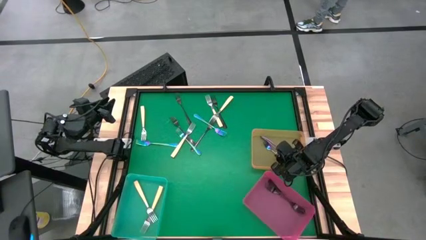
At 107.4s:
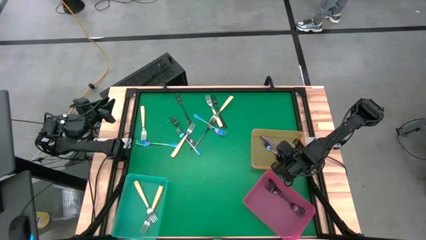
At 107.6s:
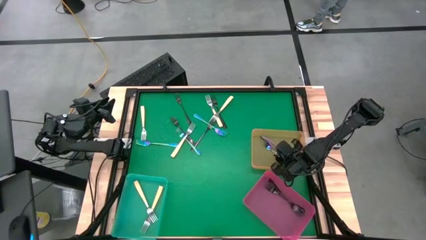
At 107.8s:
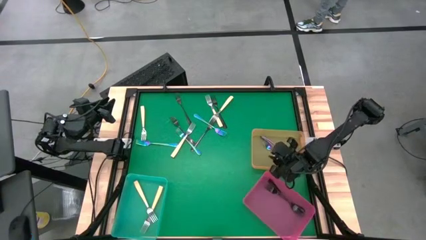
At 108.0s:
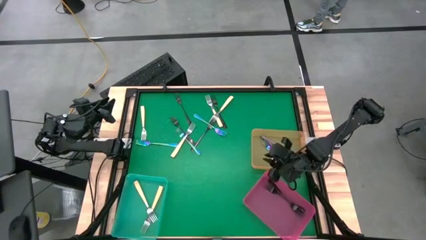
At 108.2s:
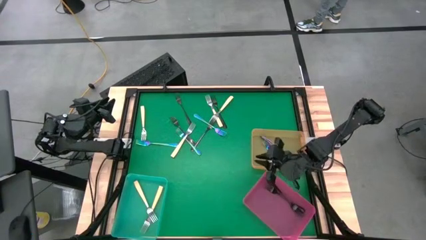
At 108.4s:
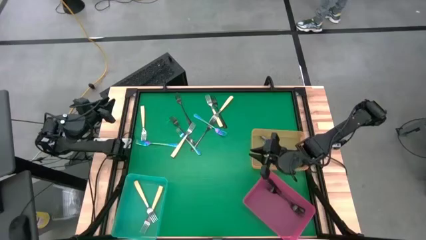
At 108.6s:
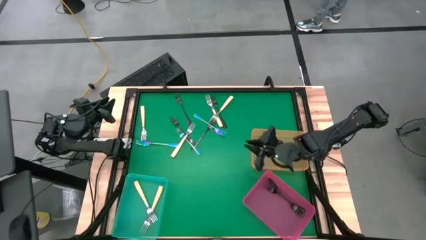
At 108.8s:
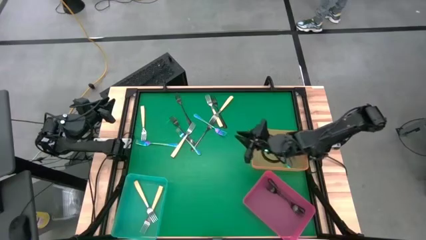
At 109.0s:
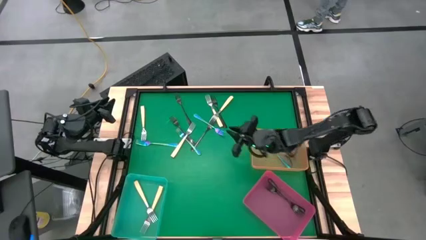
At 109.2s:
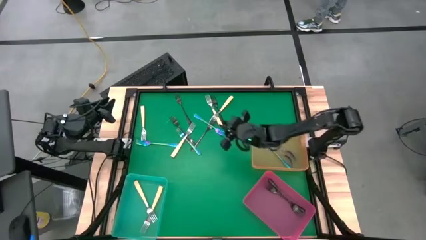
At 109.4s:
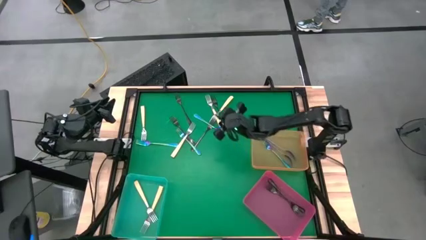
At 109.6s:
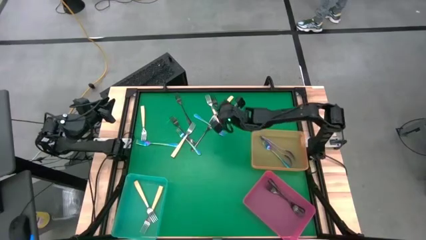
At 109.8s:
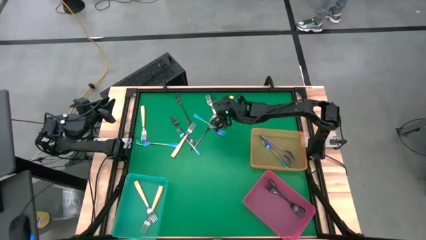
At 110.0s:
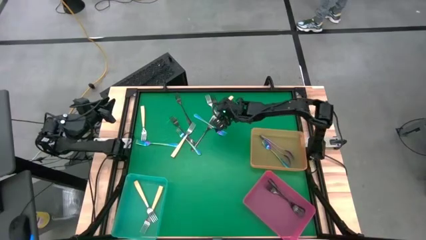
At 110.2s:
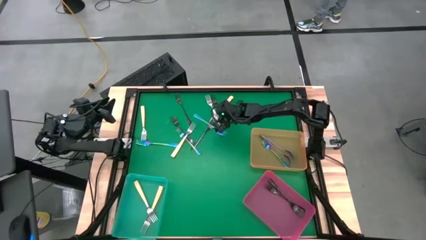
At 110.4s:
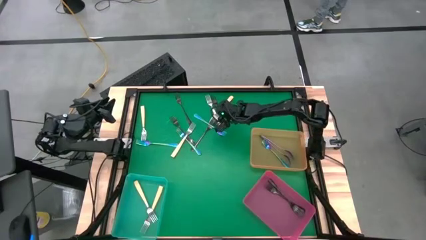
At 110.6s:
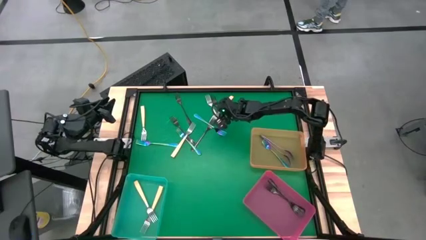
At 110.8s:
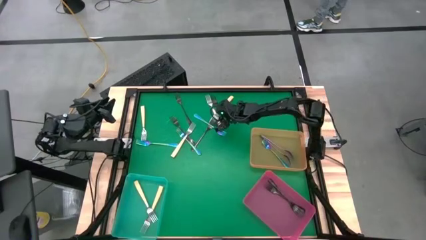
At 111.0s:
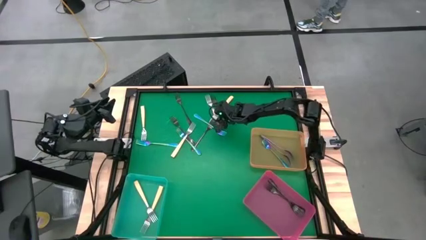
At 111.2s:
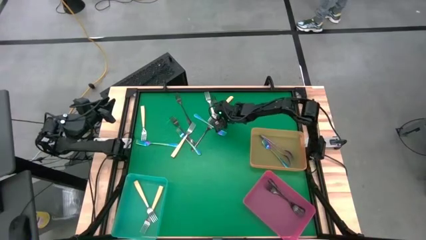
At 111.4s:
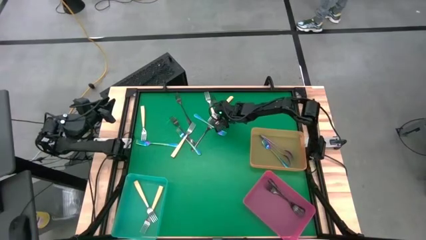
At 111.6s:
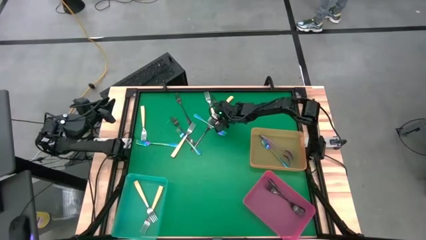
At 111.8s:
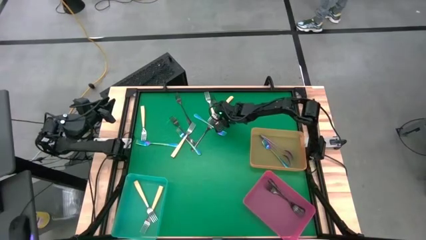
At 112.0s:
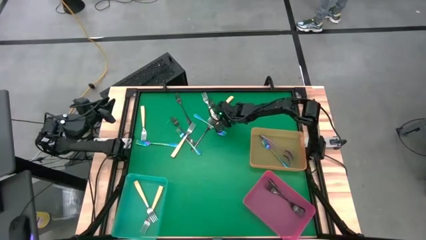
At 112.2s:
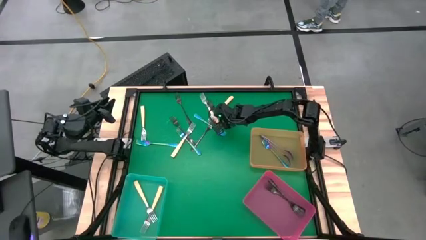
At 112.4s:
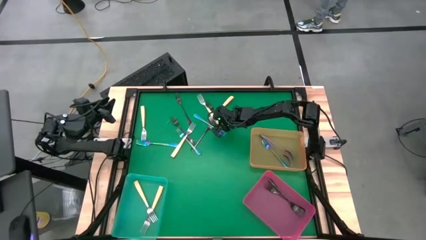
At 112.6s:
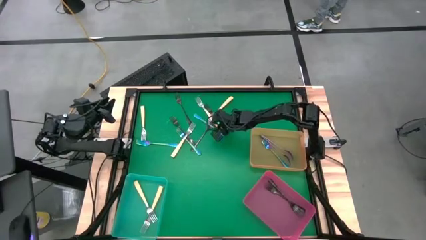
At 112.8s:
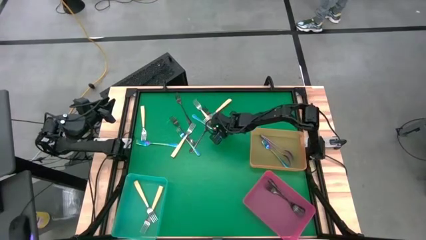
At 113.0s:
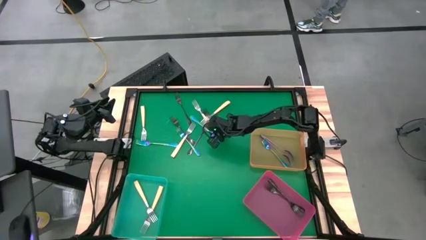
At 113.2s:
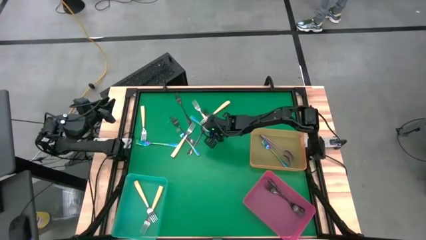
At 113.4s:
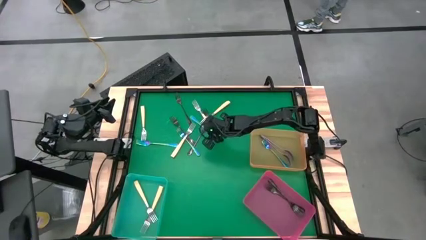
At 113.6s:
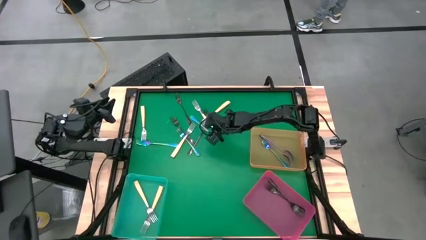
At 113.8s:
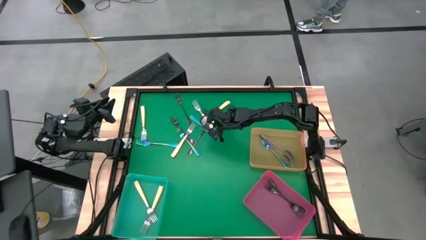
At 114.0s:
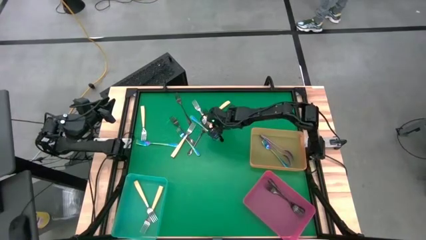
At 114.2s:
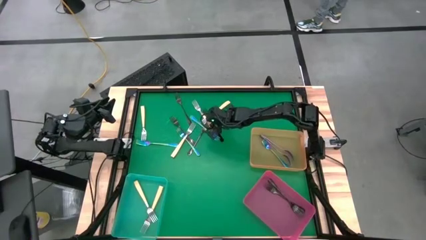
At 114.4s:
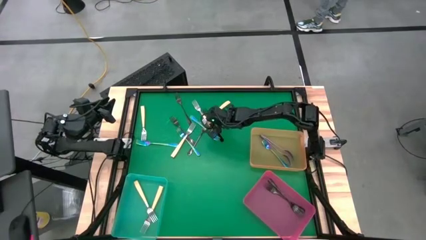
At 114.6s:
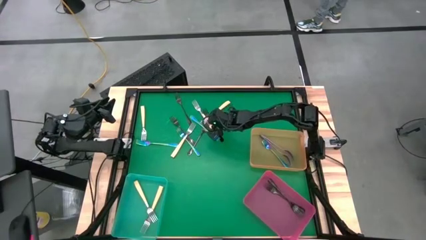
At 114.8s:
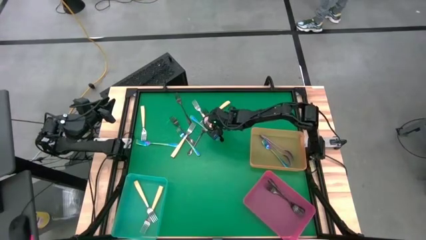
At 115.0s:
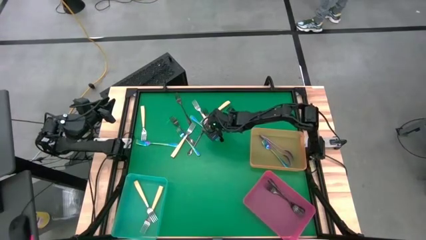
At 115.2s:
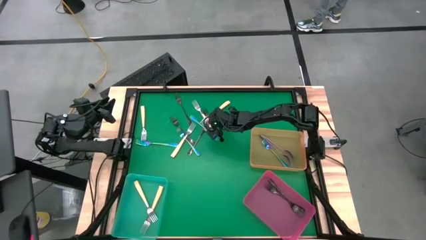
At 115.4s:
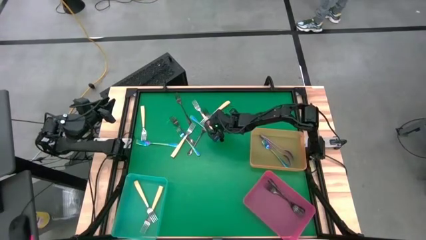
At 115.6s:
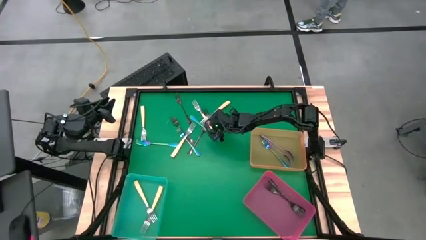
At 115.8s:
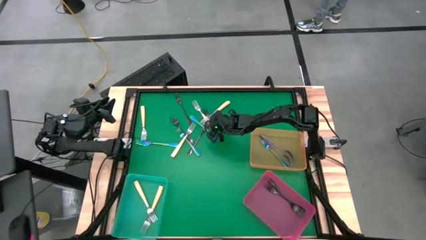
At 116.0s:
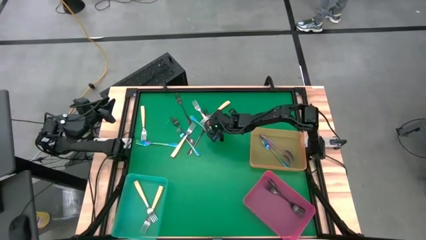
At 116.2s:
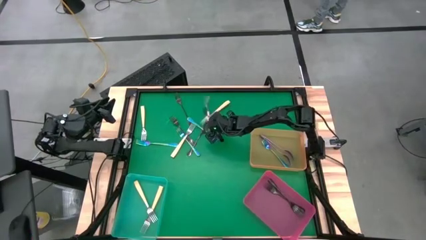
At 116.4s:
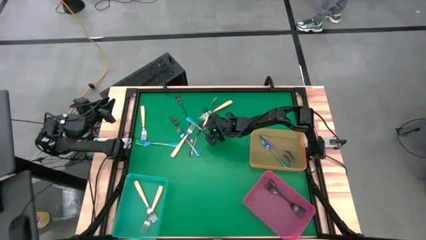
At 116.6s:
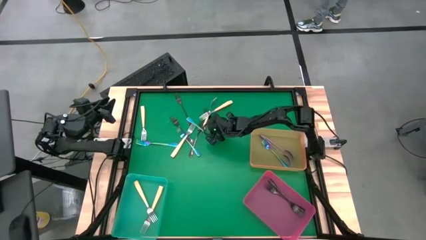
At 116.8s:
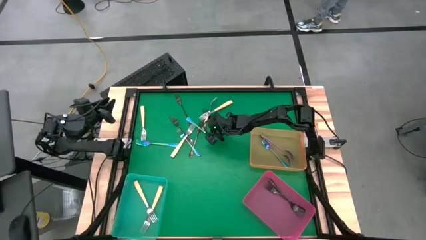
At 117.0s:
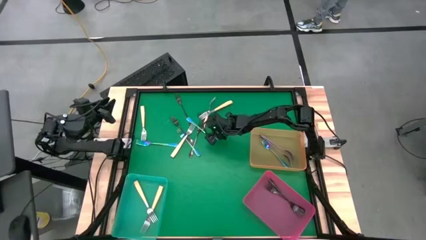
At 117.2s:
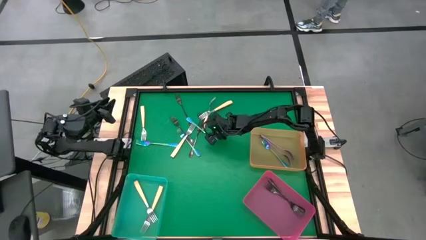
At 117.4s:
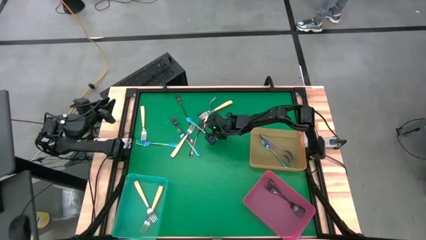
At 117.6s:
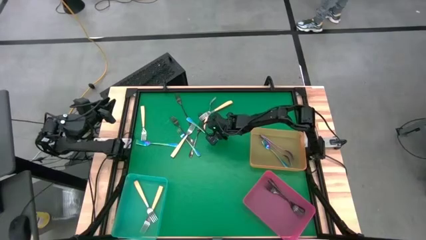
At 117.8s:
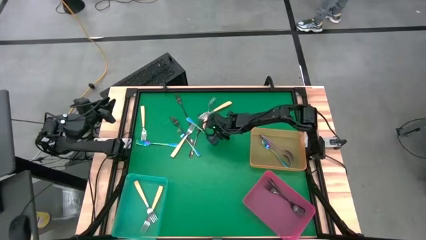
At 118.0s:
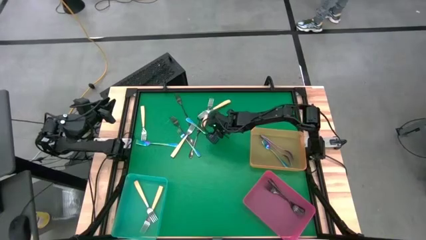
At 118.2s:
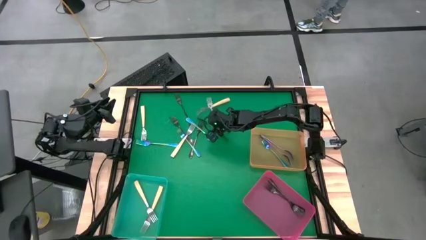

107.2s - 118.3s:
Task: Sort silverware by color (type)
Put the black fork into the pink bin

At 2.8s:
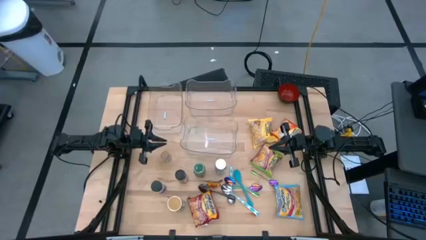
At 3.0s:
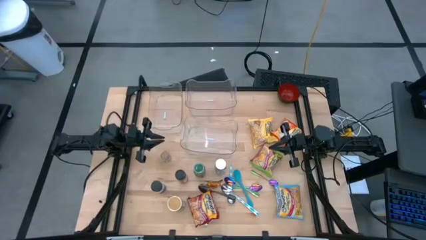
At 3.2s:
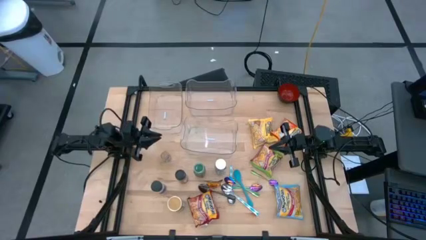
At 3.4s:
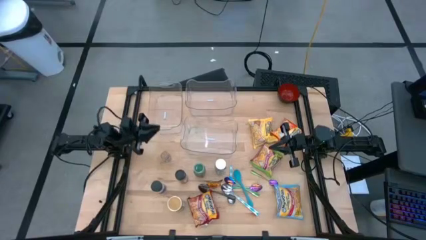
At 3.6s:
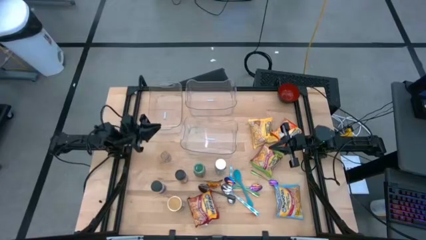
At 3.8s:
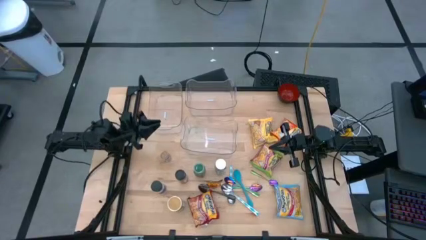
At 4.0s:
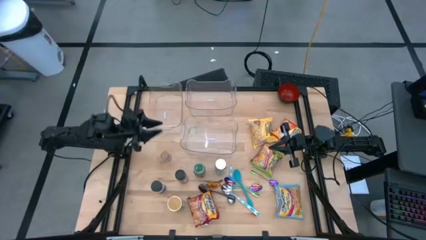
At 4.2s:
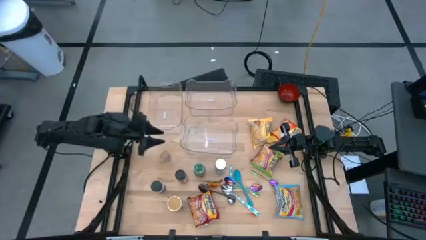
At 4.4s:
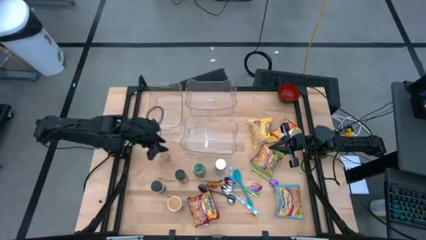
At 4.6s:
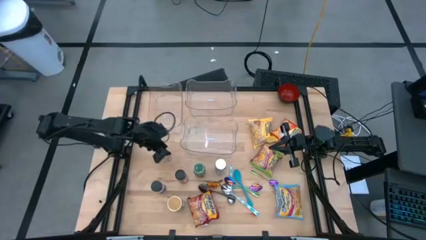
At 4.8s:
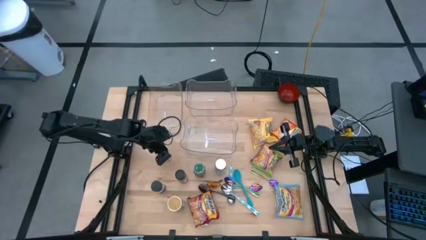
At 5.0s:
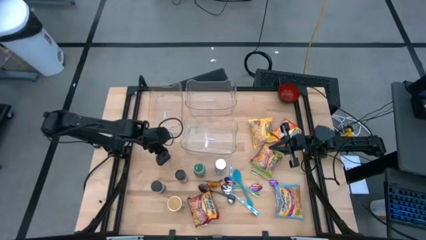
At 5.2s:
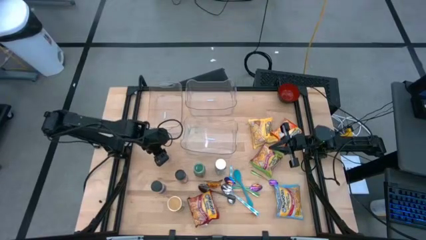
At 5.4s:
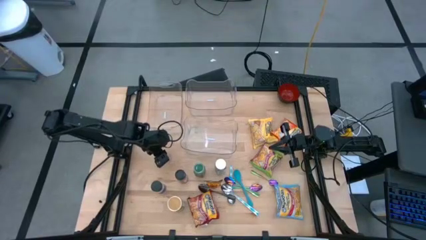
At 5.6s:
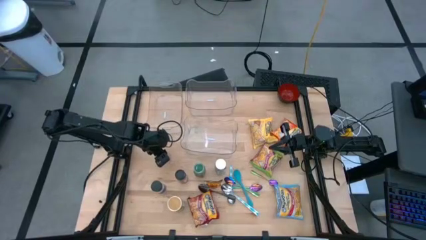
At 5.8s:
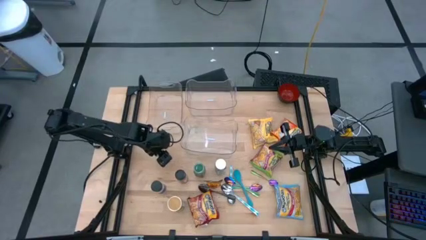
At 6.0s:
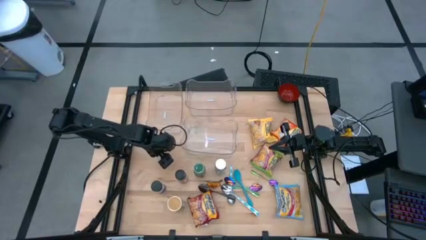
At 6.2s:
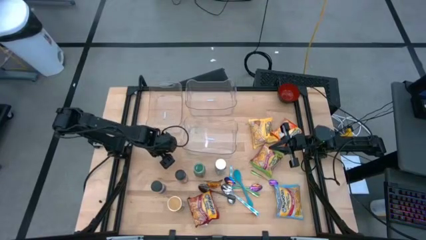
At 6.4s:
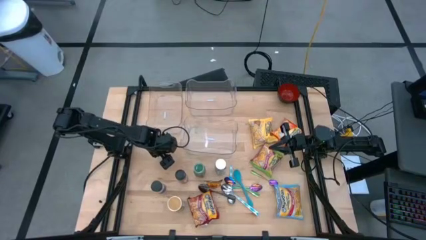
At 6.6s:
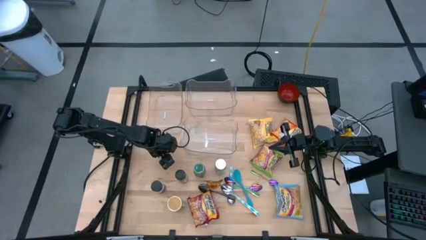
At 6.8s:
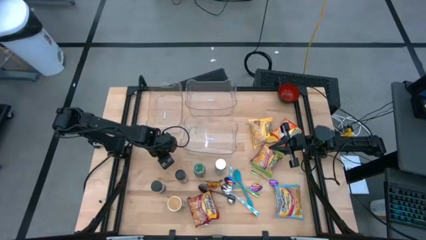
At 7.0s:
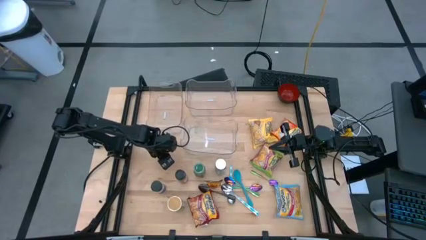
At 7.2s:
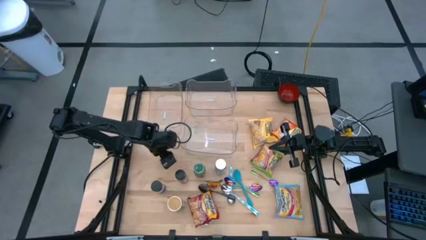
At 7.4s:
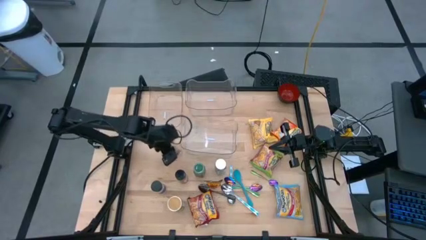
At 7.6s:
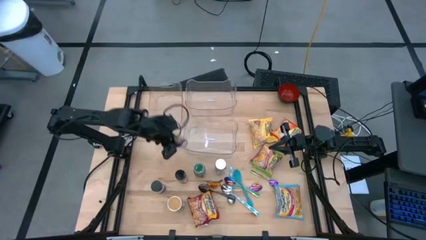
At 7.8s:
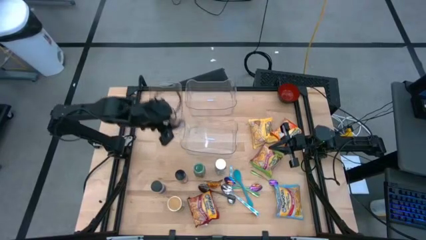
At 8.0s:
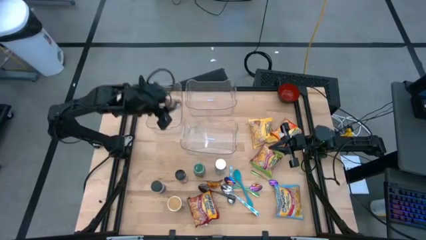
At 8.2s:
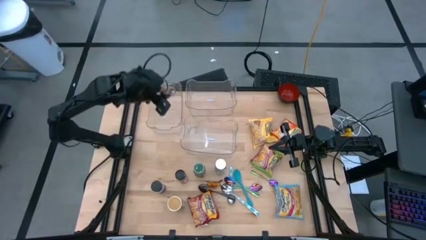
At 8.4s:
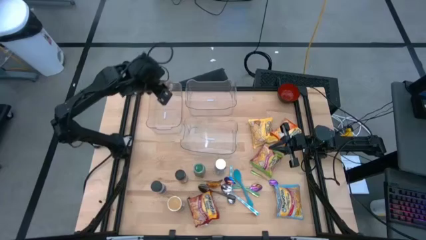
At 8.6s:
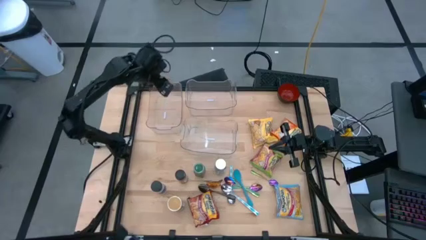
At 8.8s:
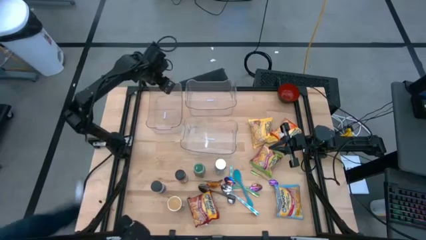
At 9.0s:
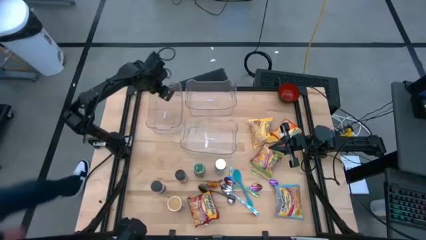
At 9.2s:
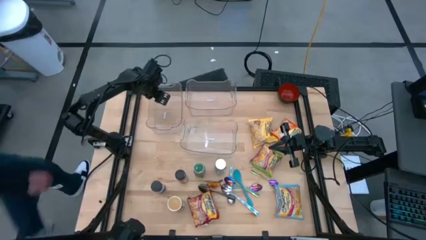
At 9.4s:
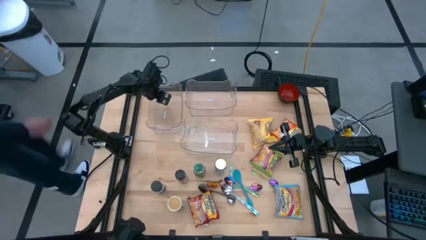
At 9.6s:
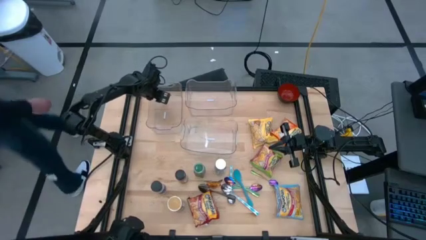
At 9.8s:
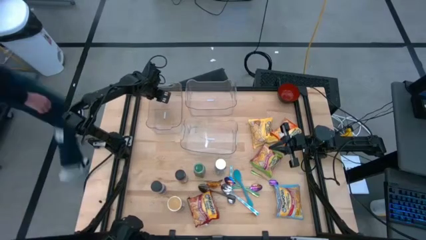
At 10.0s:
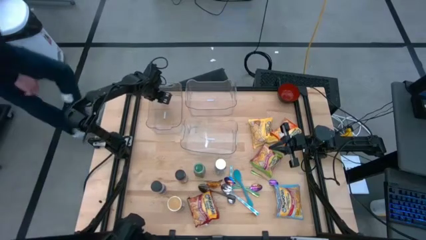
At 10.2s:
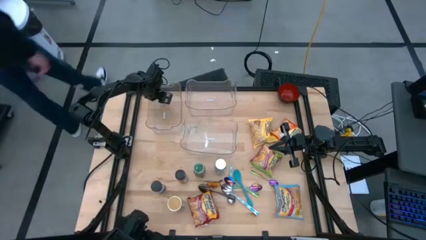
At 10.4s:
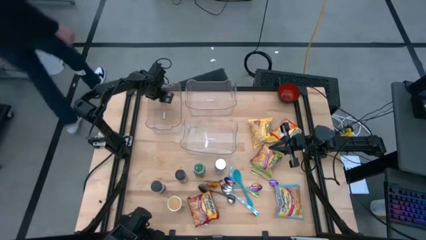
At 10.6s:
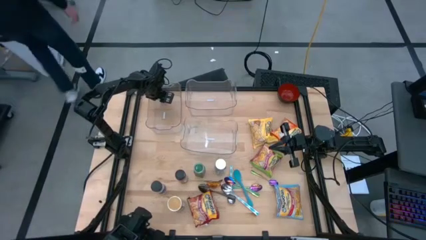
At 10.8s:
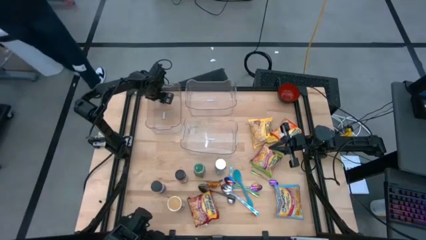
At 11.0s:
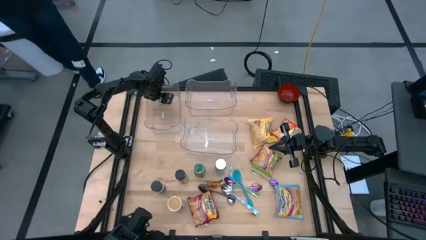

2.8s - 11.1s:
Task: Pick & Place Food Item
Put the brown seasoning bottle into the top left transparent bin
